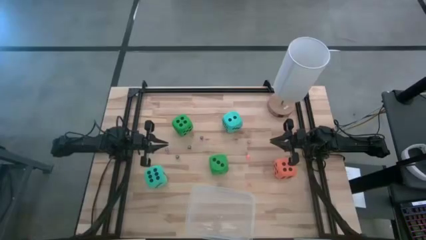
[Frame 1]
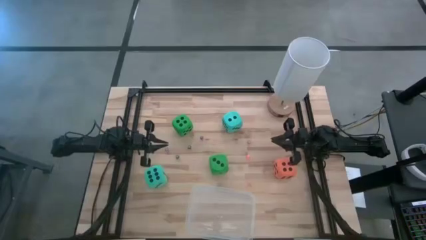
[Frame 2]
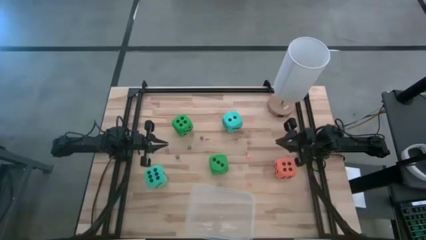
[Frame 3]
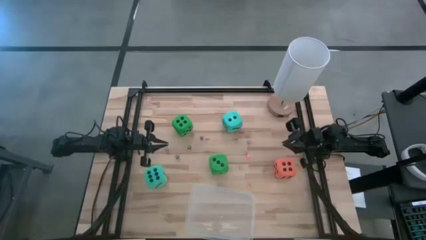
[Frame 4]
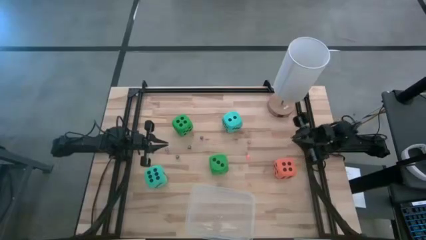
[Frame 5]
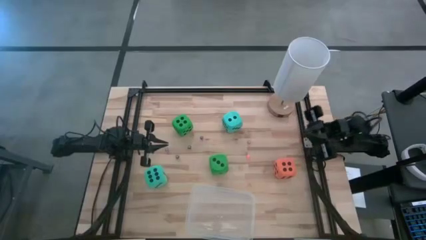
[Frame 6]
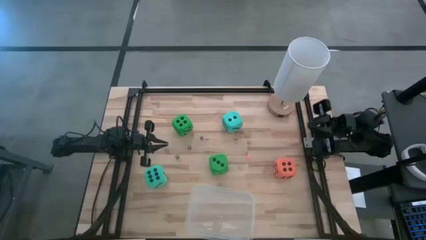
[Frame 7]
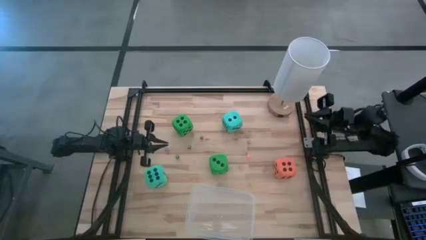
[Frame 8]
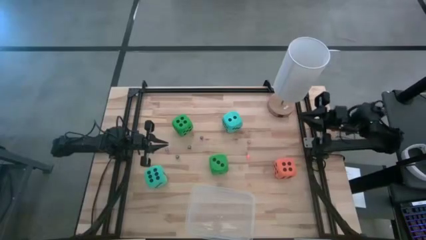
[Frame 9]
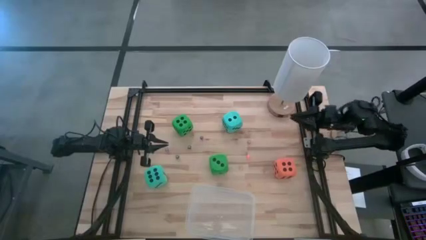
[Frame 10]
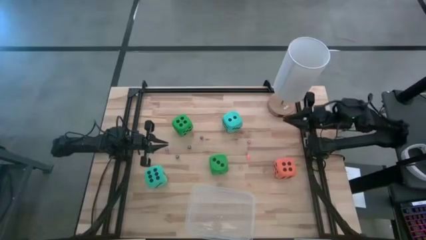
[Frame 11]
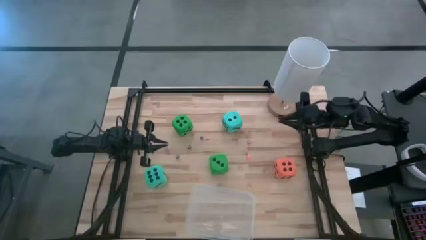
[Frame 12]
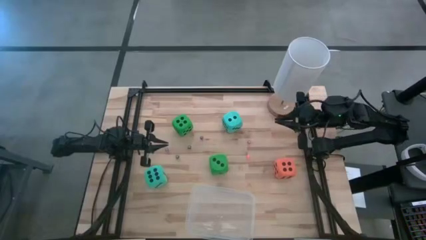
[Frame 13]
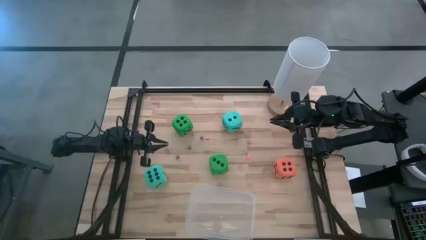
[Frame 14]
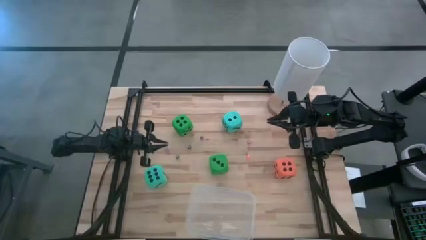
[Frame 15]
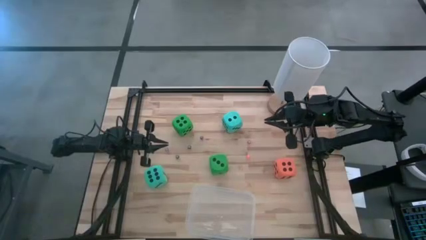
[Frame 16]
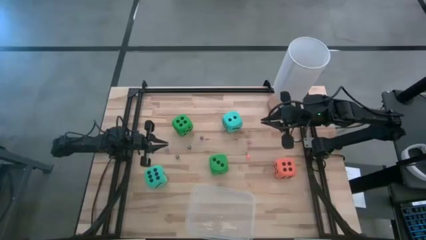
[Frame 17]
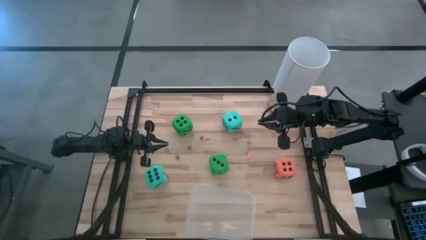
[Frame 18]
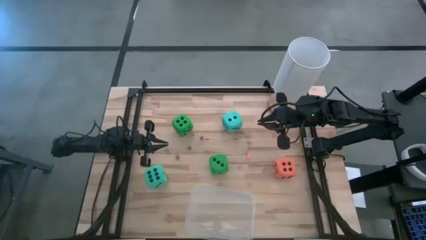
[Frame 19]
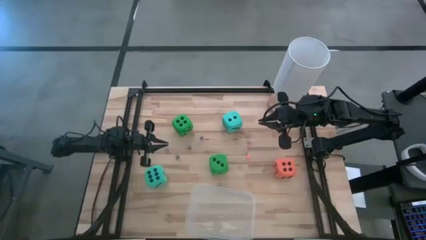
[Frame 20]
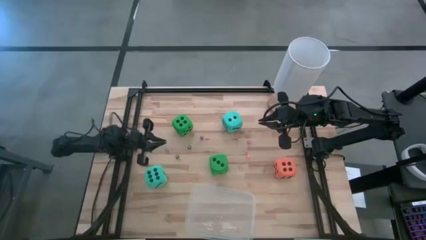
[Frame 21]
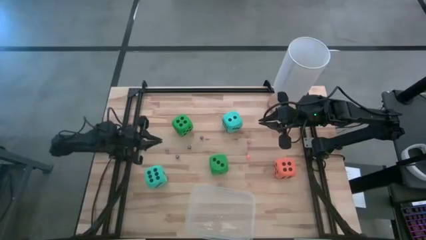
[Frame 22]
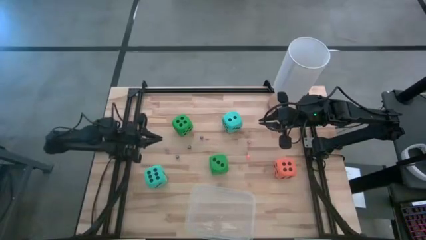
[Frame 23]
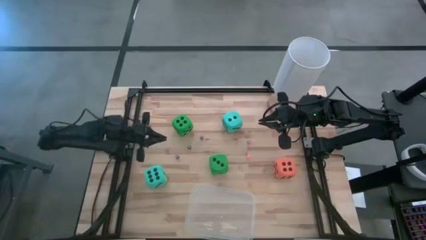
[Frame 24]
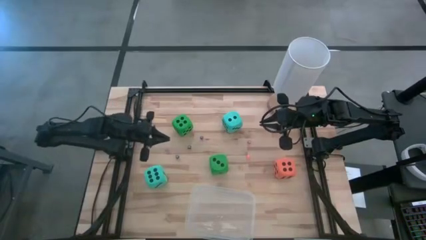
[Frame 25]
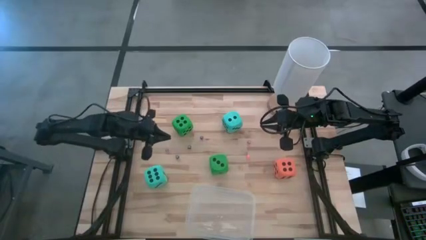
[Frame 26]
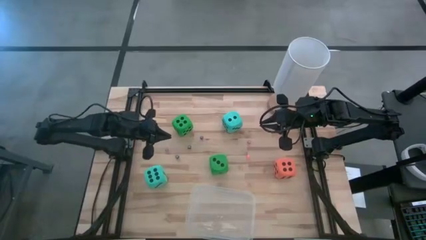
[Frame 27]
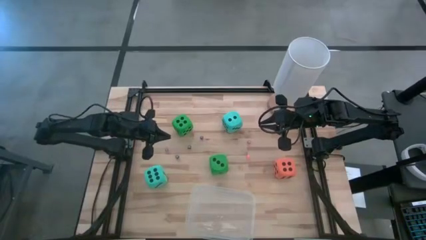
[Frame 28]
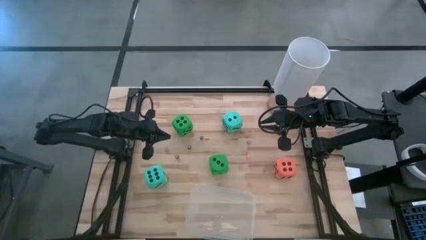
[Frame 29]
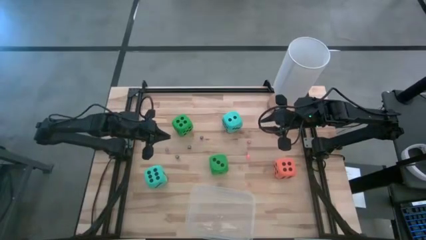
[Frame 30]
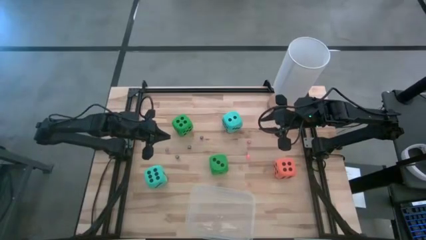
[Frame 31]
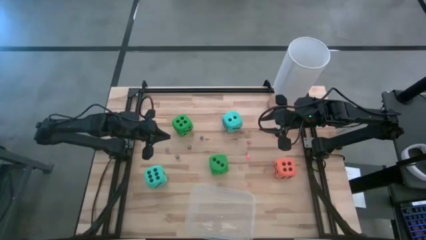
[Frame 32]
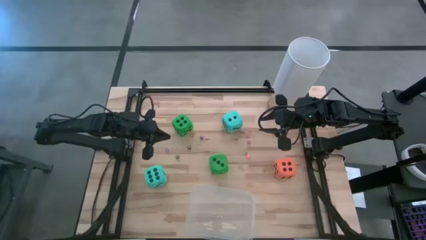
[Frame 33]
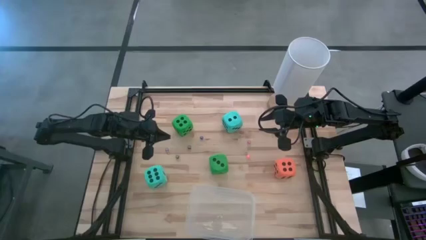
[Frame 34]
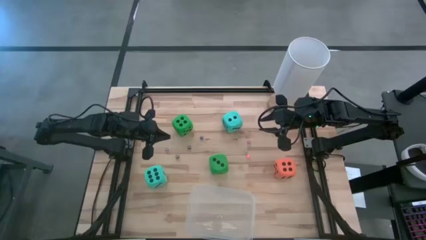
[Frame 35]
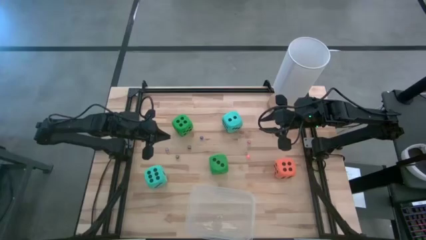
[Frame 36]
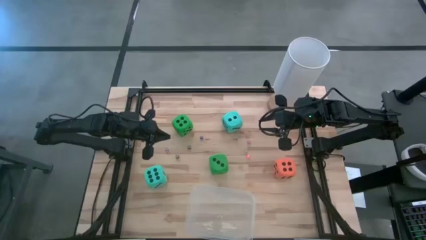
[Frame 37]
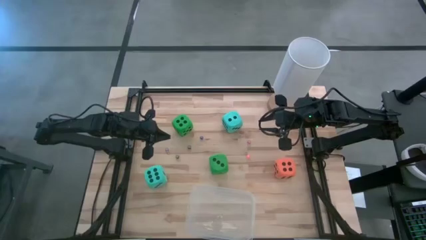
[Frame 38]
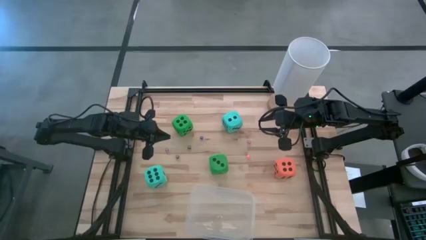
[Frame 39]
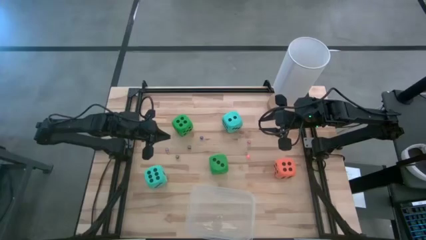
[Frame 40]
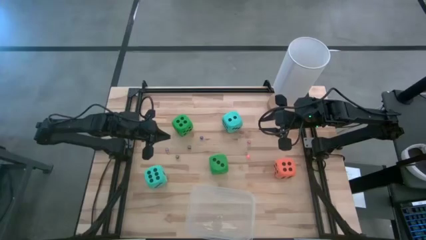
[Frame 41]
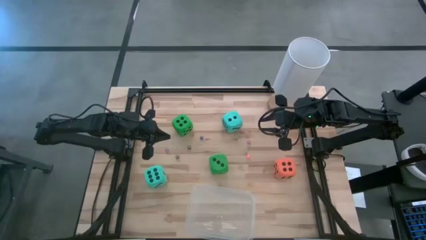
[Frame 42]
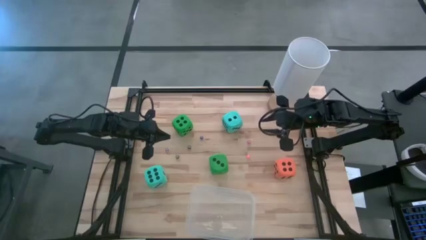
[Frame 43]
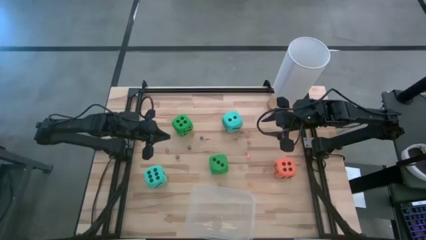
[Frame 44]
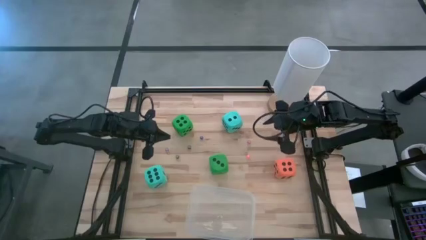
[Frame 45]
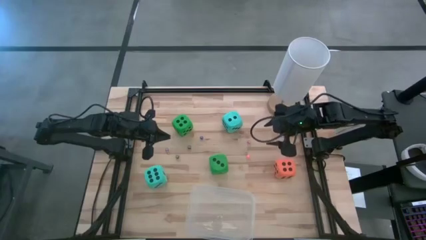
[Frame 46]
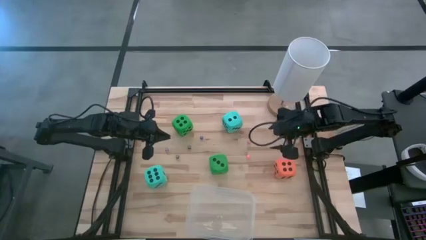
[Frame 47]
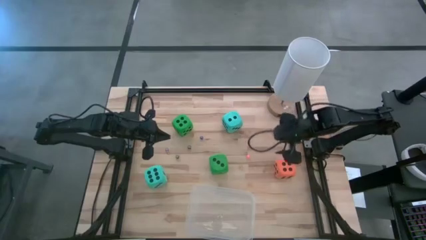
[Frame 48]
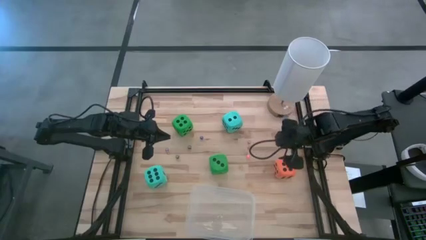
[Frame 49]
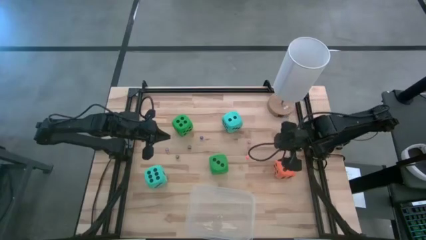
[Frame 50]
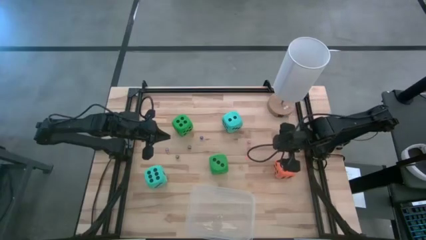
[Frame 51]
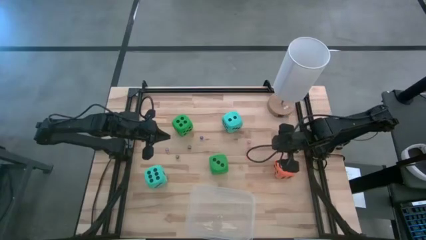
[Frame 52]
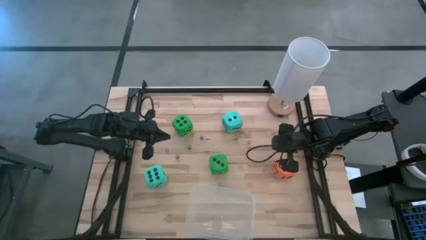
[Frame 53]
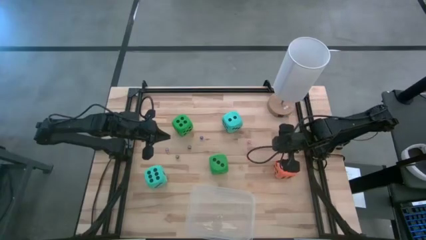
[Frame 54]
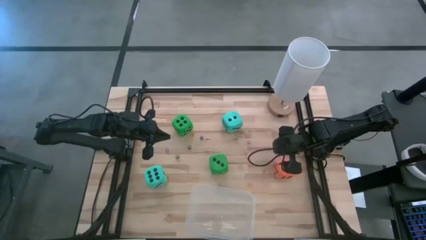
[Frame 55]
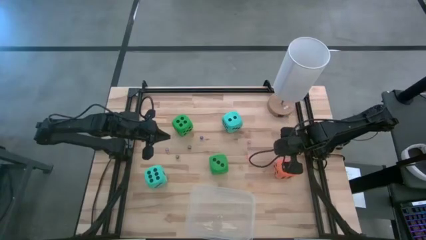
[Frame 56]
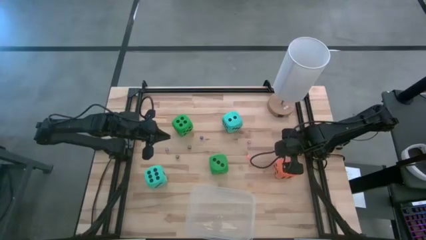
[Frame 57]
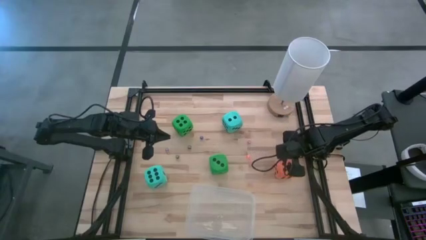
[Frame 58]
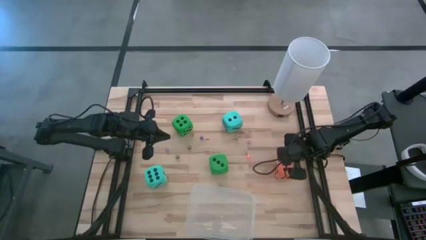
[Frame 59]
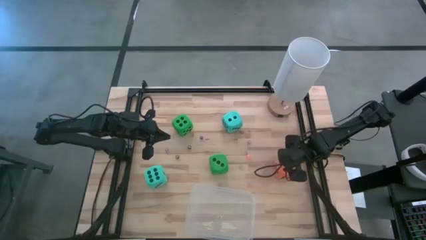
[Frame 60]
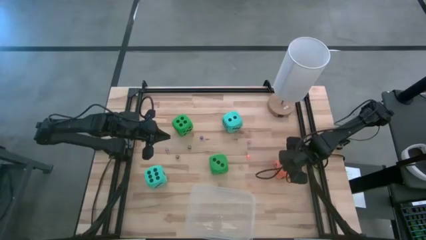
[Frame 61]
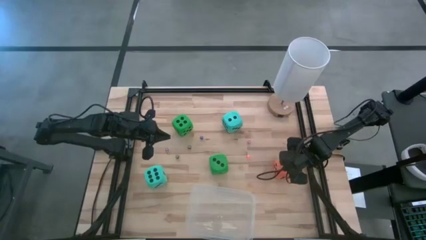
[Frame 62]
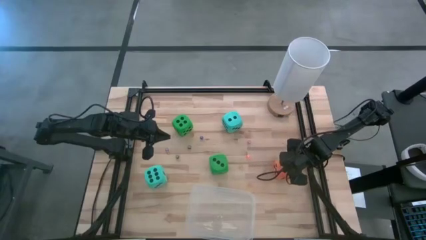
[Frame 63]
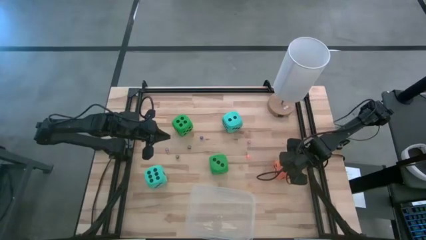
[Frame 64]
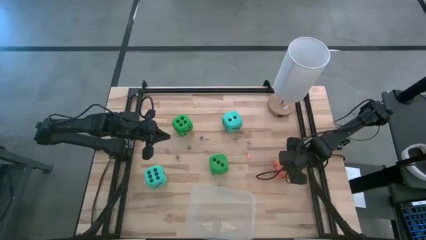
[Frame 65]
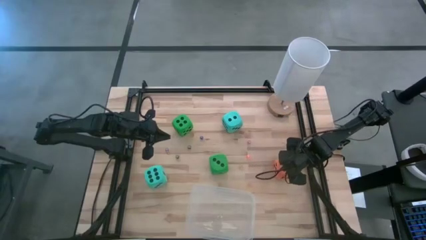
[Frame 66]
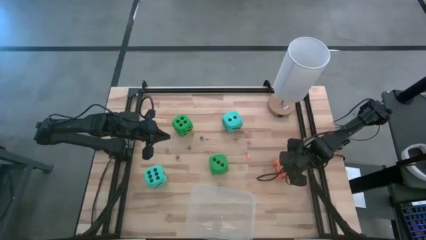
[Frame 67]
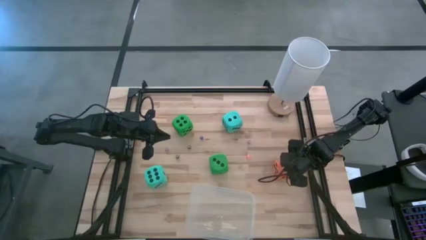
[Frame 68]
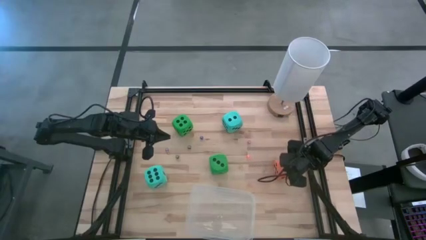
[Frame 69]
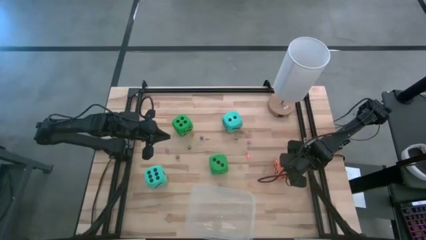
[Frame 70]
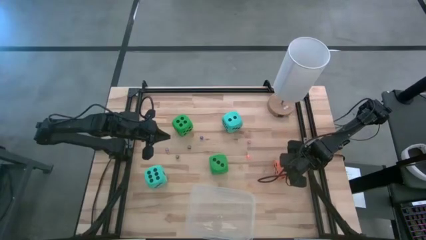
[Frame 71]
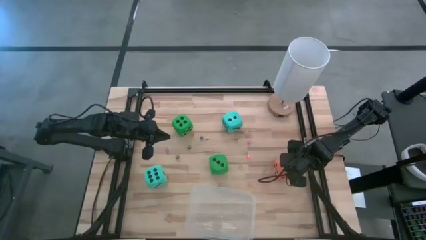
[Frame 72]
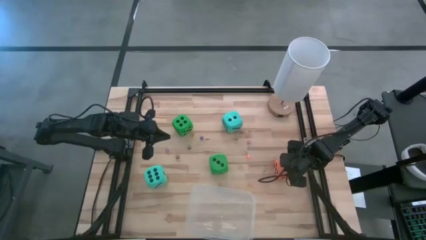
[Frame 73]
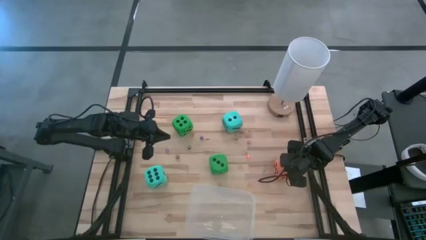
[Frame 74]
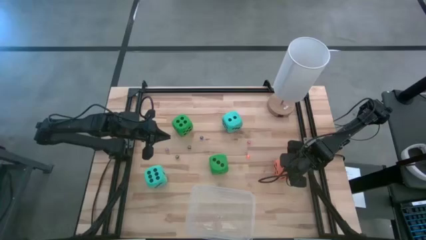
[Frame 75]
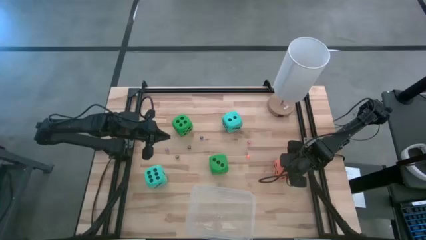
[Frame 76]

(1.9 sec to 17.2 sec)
Task: Pick & Place Dice
Put the large orange dice into the transparent bin
